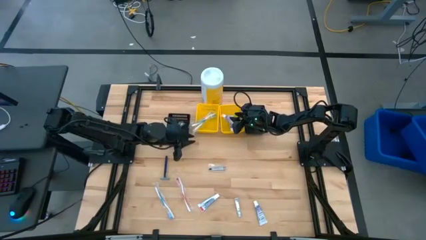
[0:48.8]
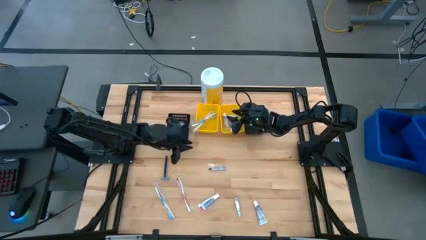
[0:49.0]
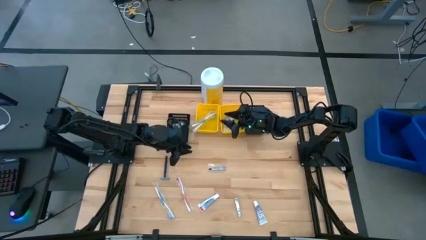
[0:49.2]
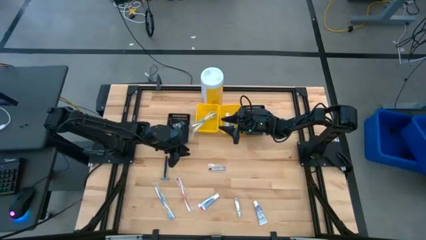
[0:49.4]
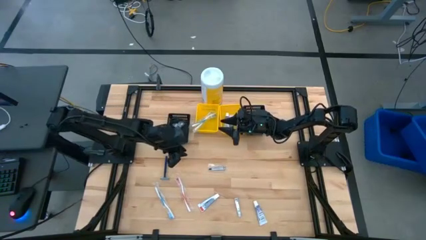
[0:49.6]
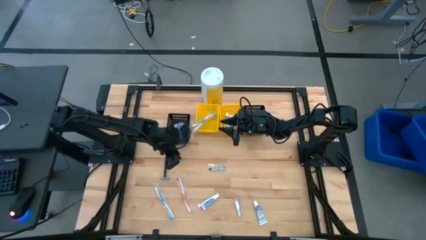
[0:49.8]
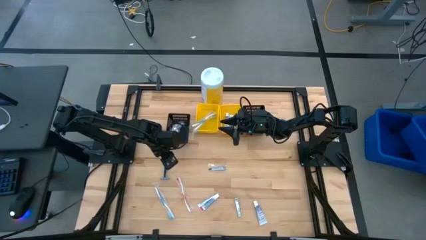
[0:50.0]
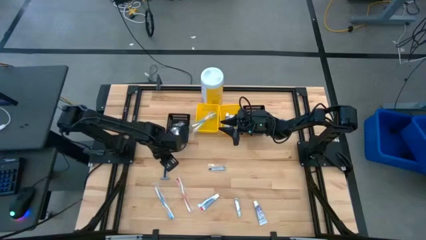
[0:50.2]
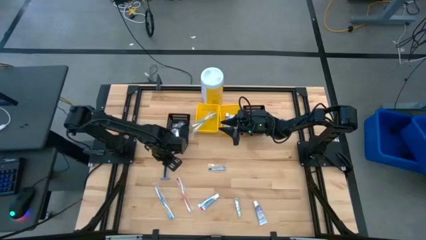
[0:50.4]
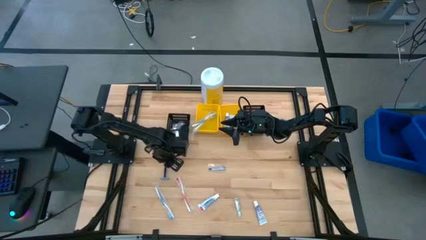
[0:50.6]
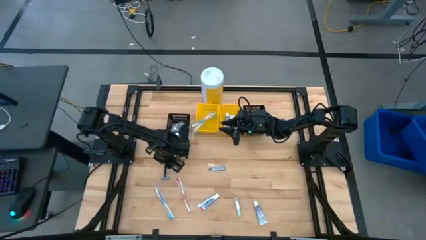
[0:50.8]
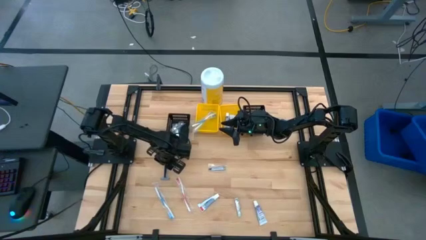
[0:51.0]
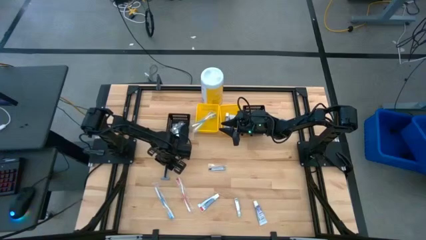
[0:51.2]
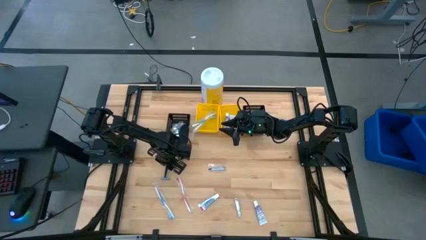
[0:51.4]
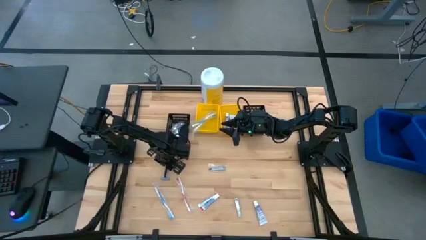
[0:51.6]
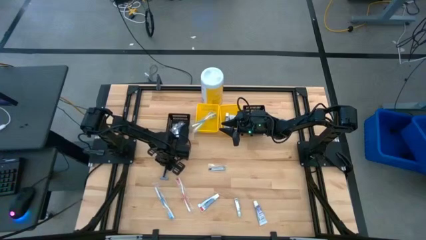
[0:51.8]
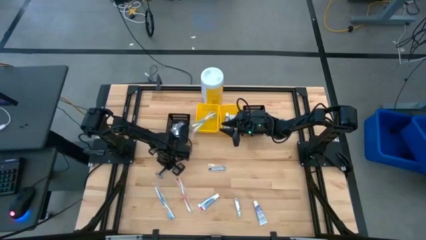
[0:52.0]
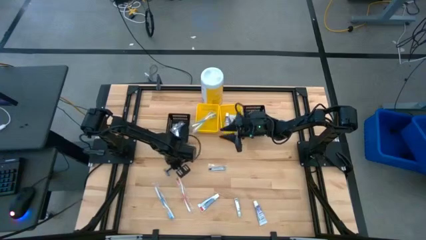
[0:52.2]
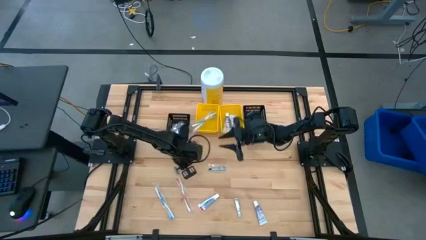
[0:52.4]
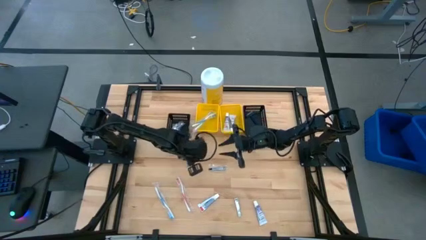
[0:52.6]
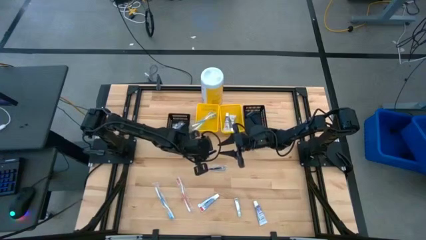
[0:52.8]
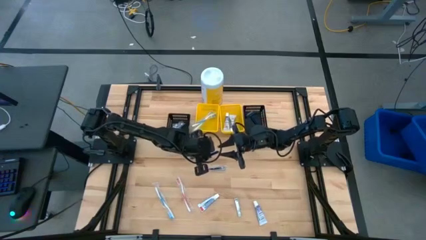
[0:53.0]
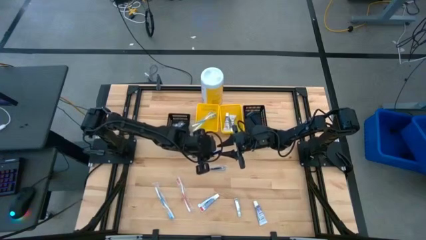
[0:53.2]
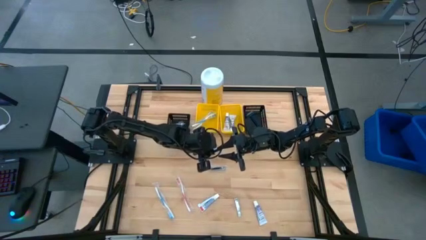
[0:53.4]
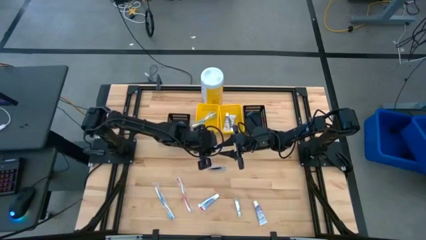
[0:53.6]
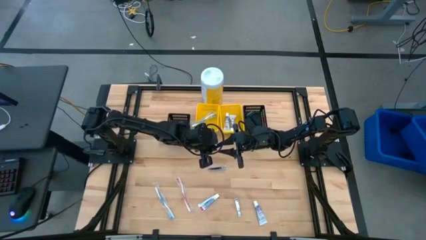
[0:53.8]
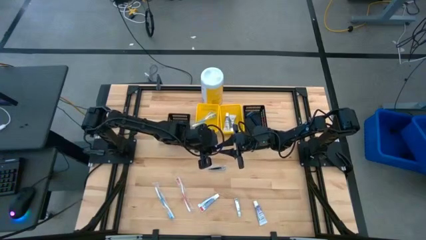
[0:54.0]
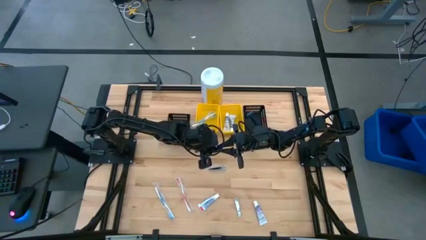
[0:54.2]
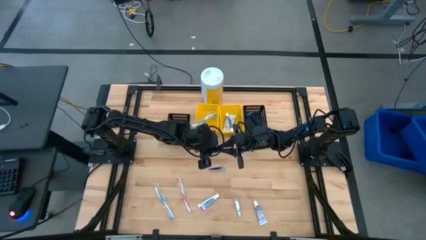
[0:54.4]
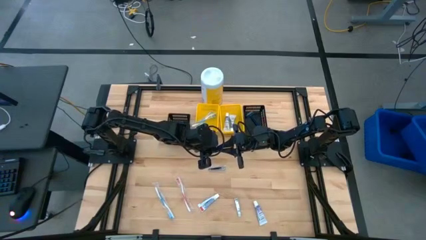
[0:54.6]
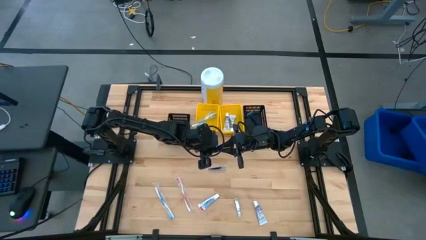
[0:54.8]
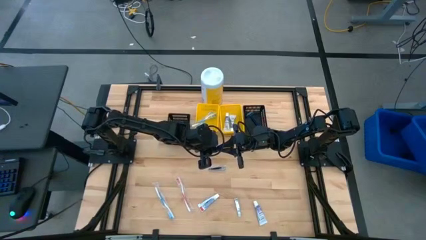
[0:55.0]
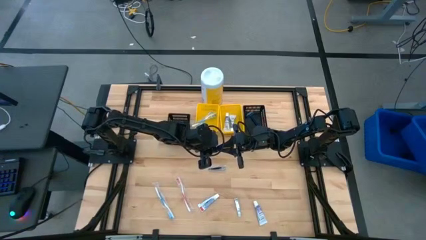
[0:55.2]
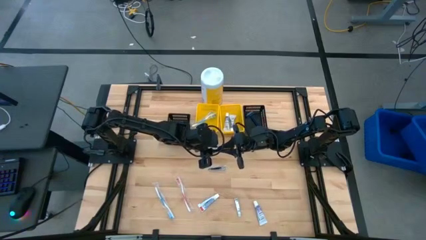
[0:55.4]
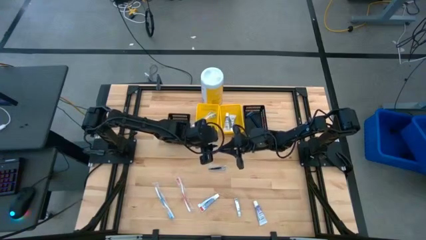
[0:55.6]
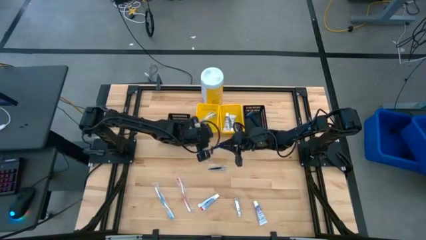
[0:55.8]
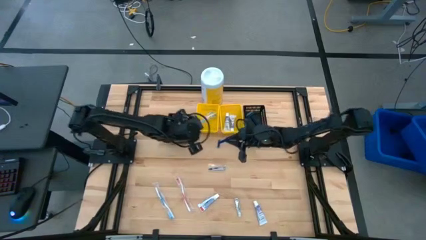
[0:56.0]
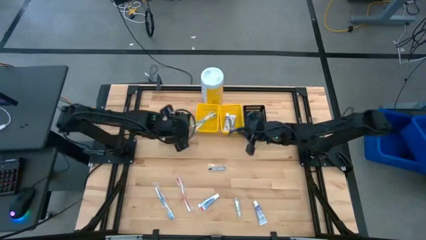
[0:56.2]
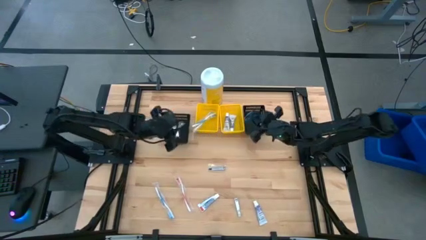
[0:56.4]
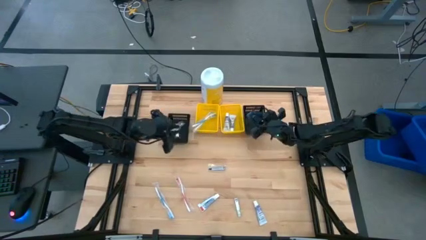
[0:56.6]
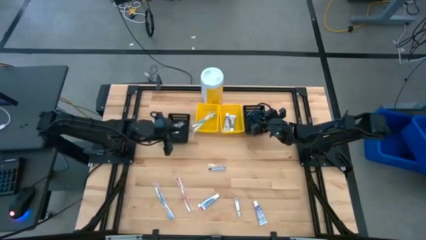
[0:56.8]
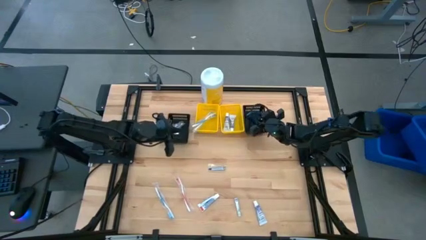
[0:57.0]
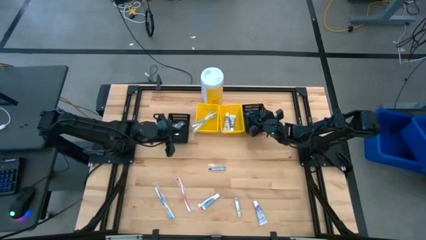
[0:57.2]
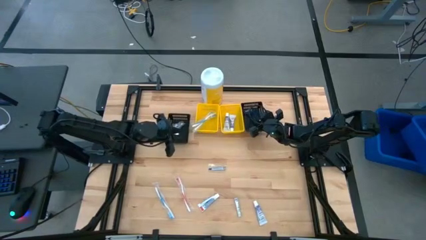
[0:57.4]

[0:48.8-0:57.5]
Task: Pick & Place Travel size toiletries
Put the blue razor into the right black bin

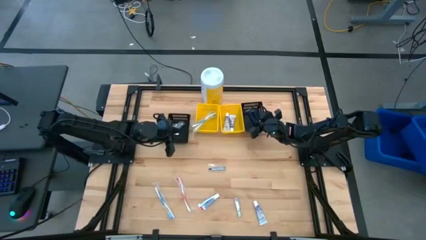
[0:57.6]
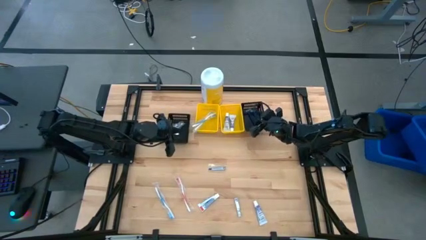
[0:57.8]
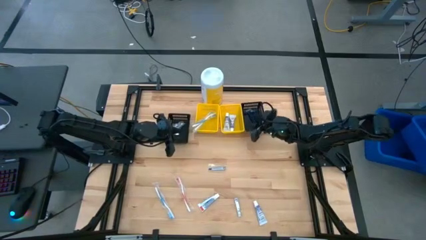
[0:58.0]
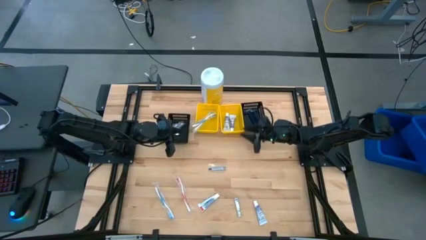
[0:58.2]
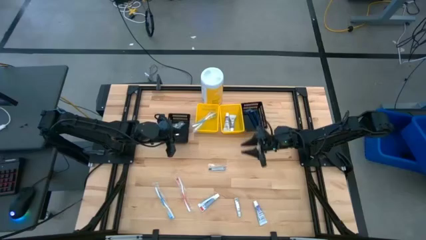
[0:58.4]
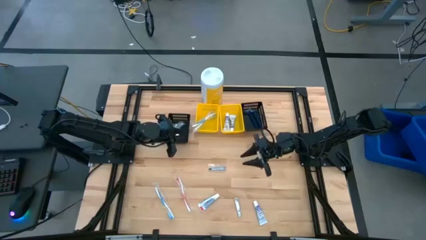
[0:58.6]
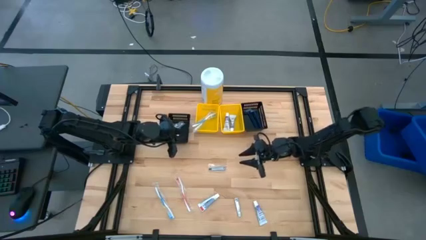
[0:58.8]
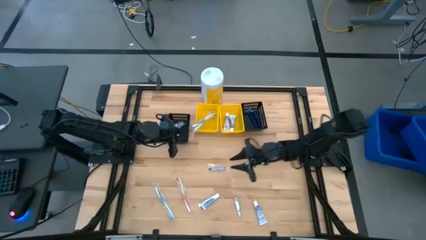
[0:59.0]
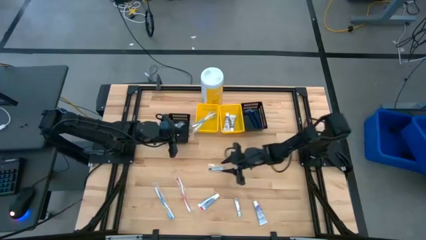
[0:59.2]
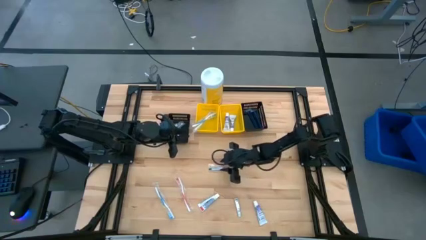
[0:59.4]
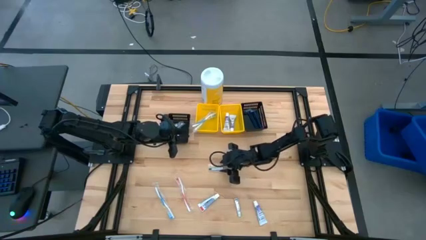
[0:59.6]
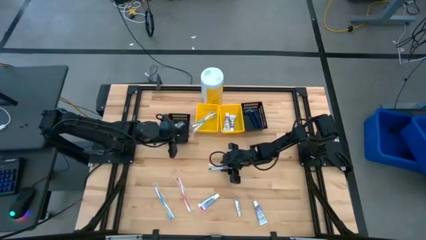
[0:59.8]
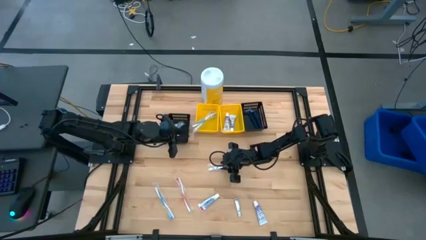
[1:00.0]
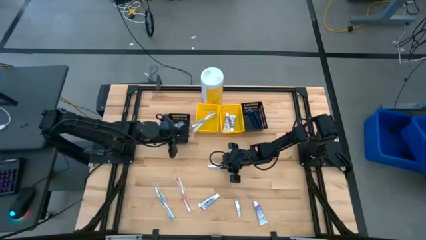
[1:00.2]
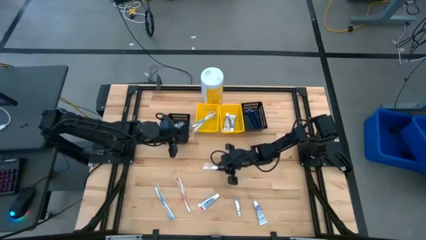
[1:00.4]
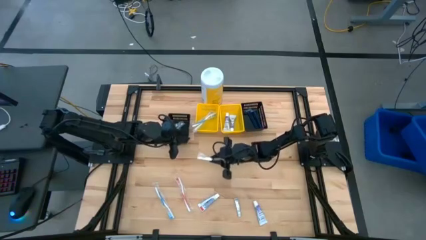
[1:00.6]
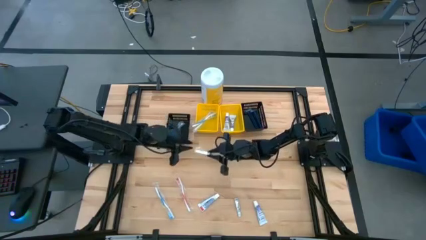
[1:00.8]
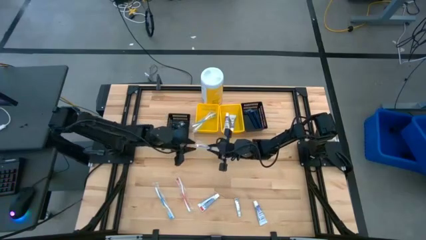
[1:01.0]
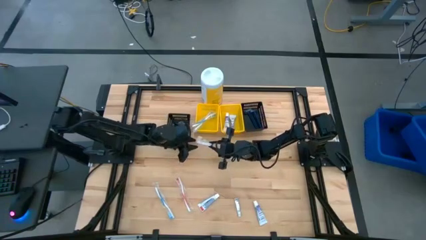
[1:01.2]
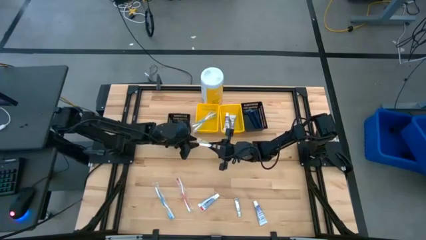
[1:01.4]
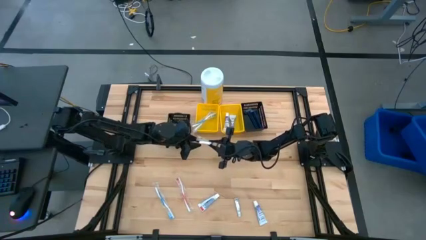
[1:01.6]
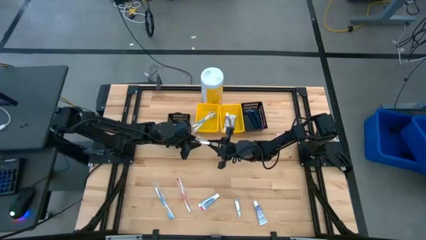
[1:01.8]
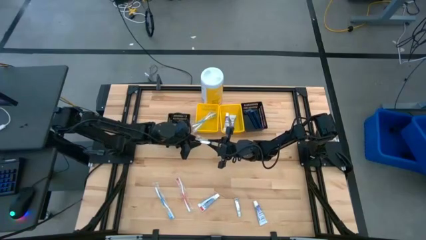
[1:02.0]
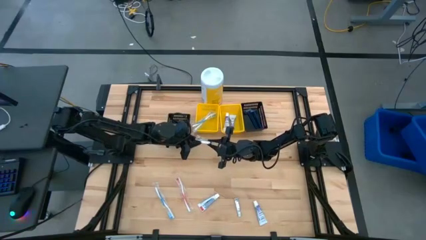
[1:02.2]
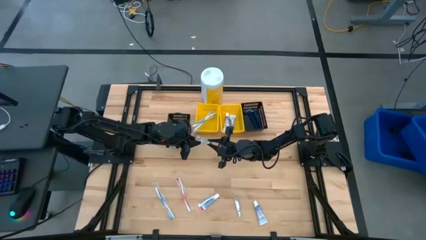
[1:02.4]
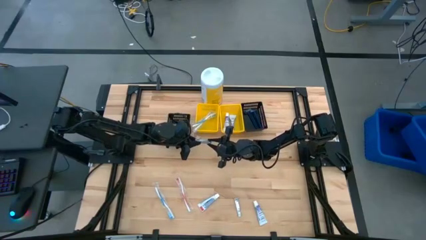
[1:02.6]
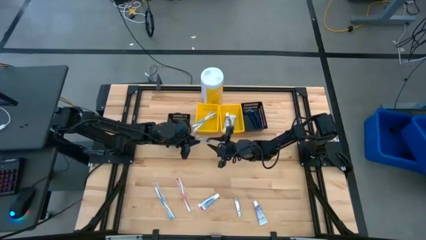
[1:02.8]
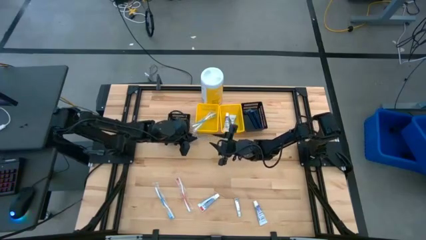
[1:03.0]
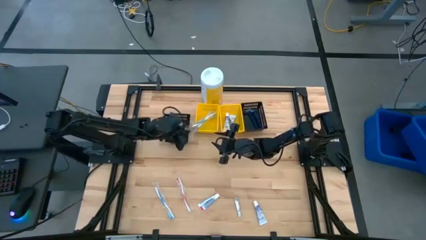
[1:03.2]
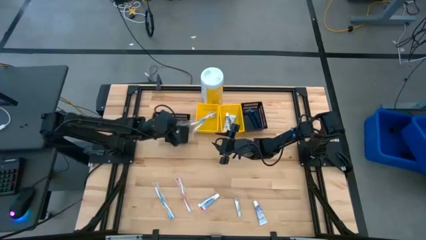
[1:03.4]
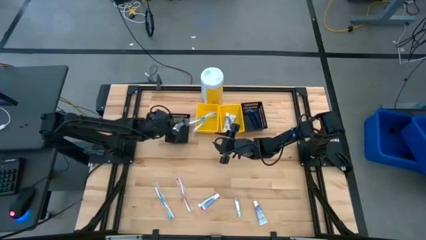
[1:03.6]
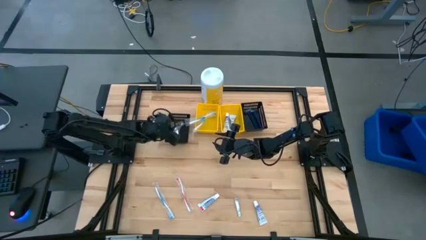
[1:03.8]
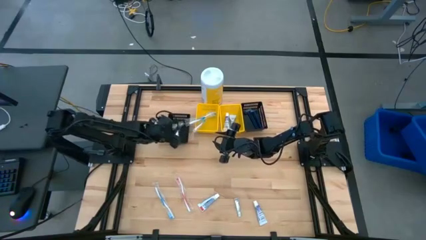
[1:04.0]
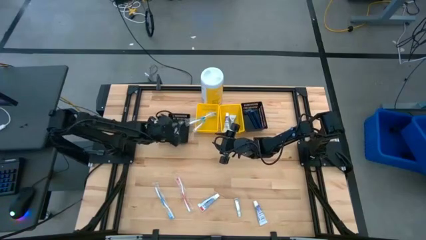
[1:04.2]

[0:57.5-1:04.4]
Put the silver nail cutter into the left black bin

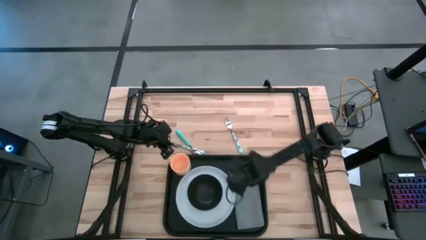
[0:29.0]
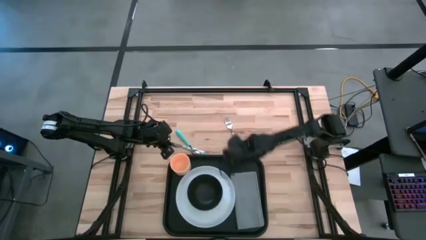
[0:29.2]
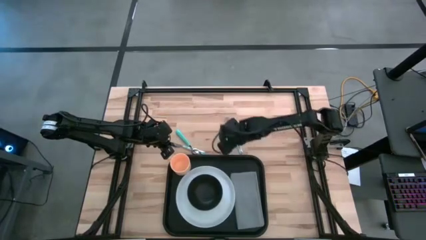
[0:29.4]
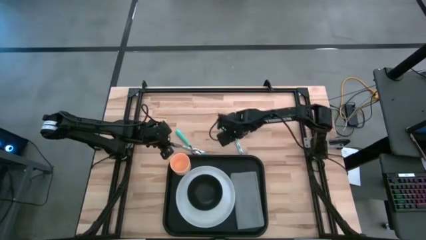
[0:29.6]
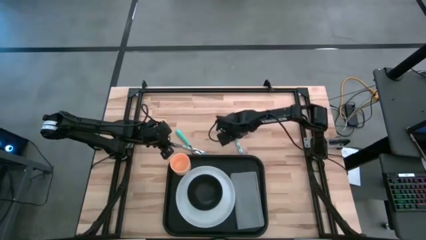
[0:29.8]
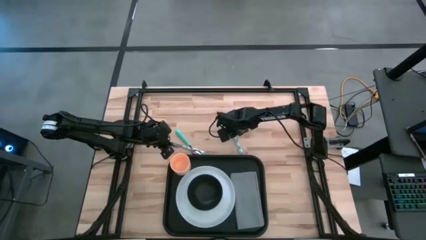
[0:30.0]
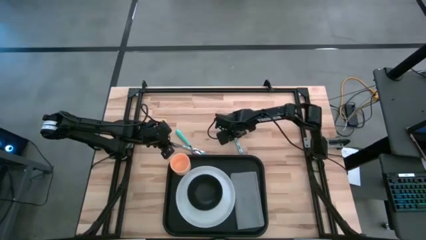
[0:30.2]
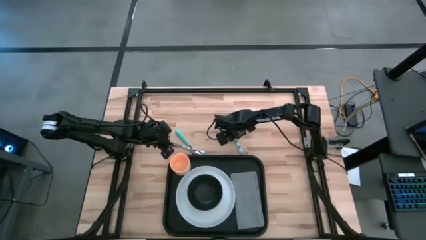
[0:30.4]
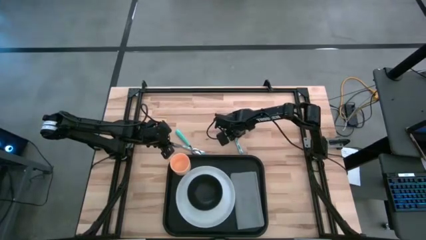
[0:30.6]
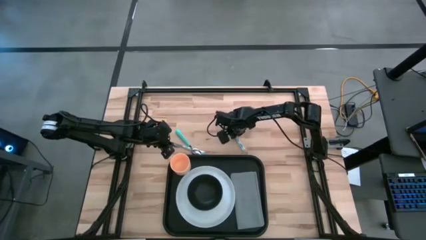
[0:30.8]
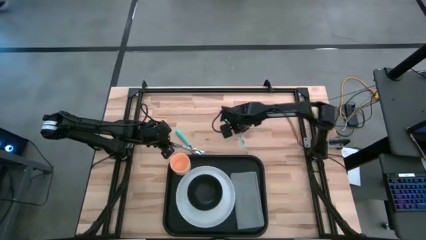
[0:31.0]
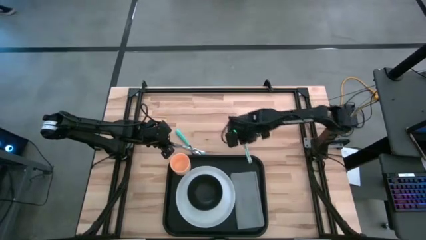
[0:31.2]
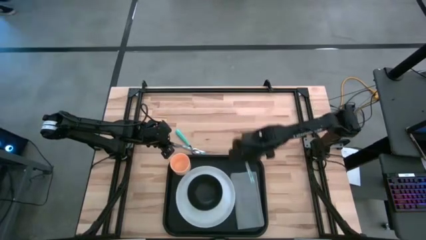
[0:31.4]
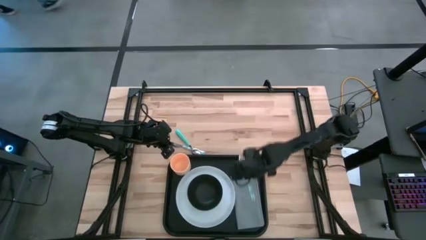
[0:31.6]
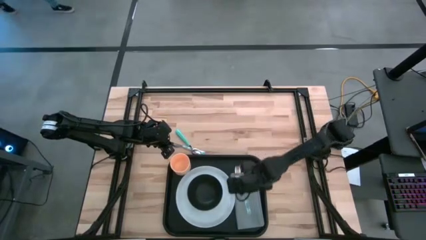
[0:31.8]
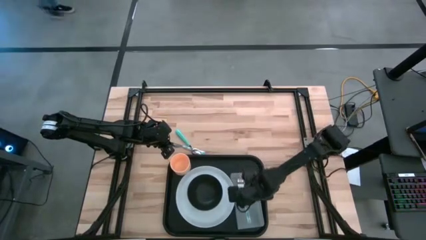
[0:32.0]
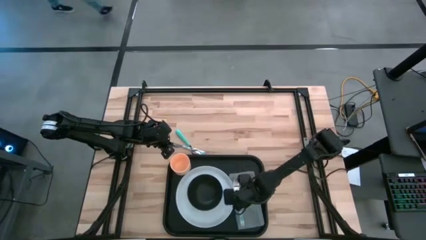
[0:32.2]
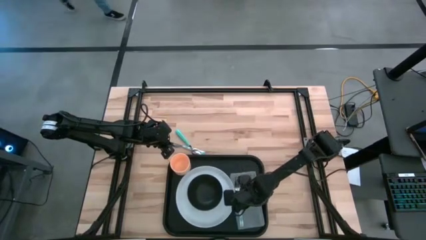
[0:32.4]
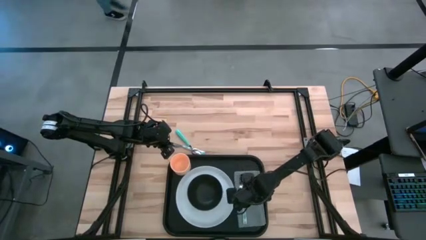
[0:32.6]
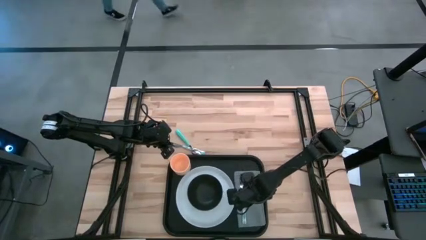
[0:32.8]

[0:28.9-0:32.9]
Task: Set up tray
Put the green fork on top of the gray napkin on the black tray
